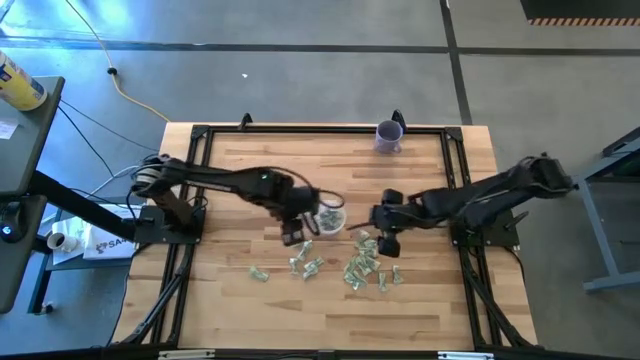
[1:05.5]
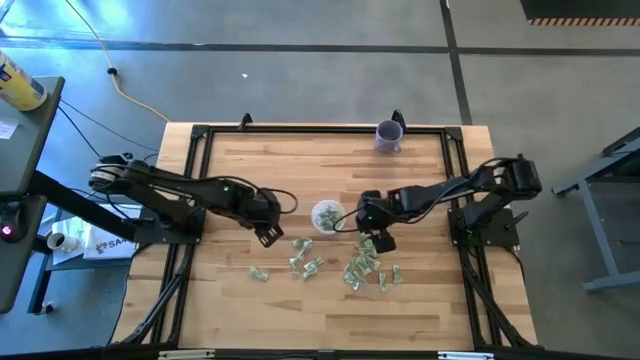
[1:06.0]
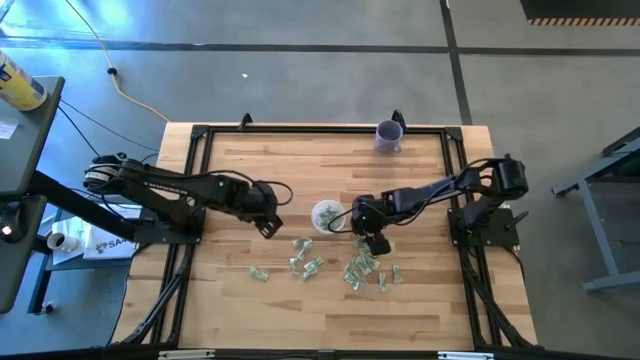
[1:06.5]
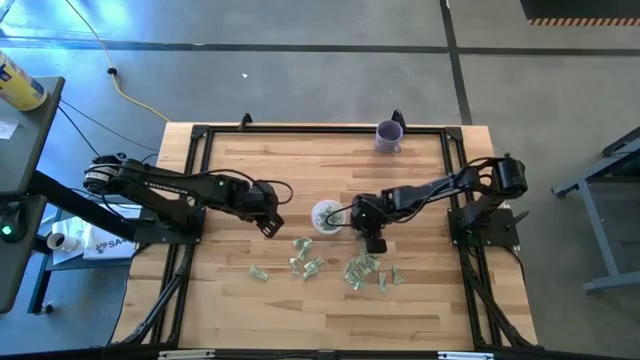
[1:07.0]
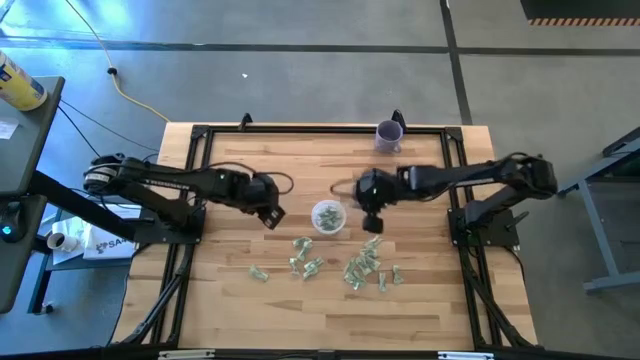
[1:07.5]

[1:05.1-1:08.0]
Task: Pick and place Stevia / Truvia into bins
Put the green stevia packet into the transparent bin

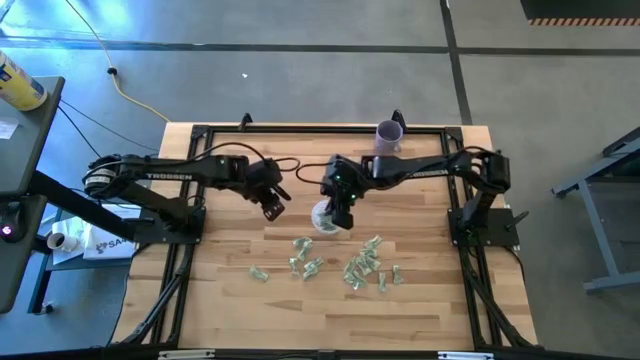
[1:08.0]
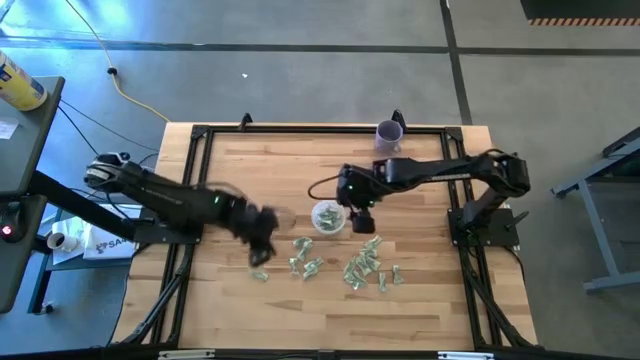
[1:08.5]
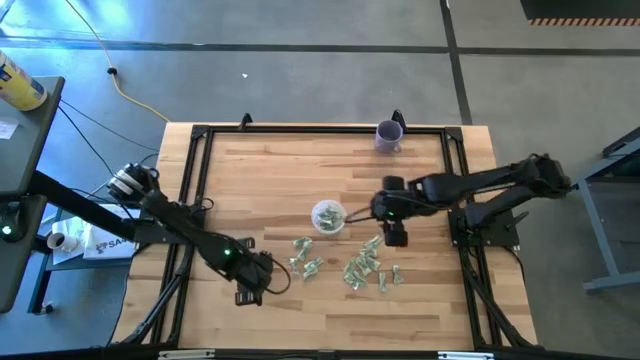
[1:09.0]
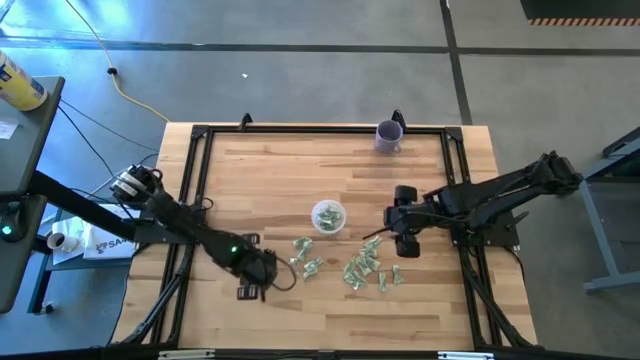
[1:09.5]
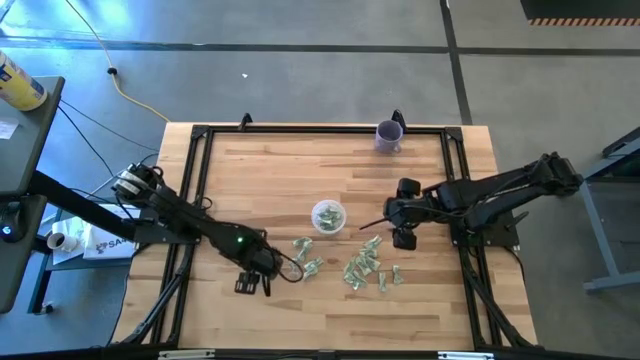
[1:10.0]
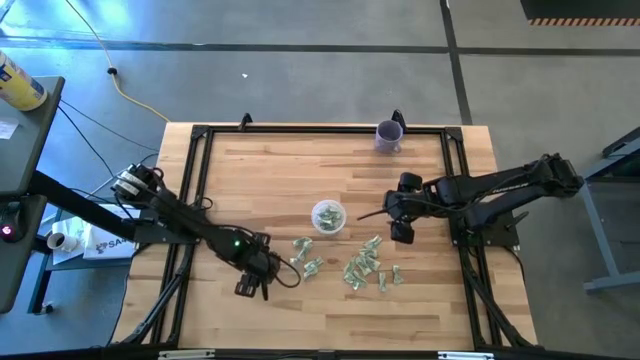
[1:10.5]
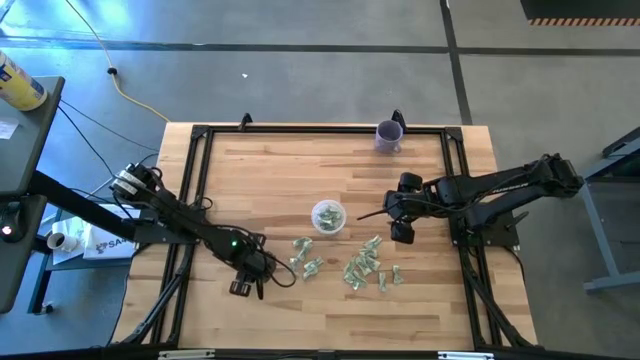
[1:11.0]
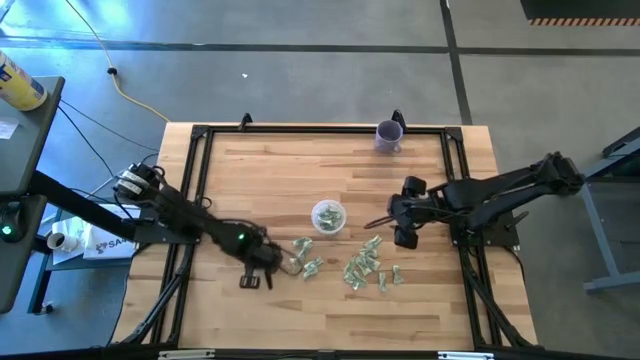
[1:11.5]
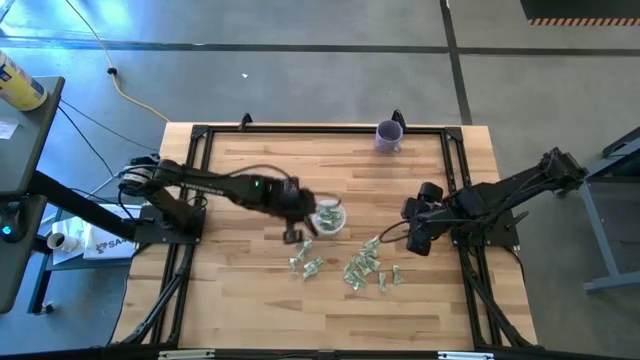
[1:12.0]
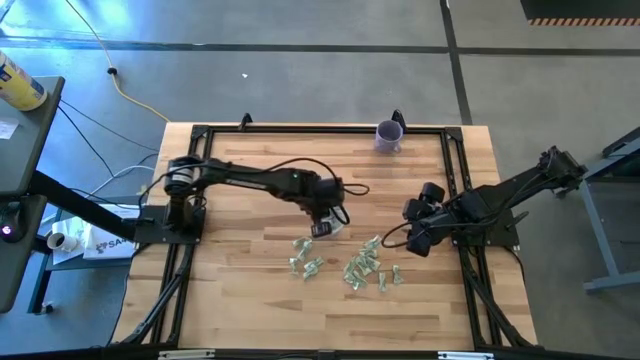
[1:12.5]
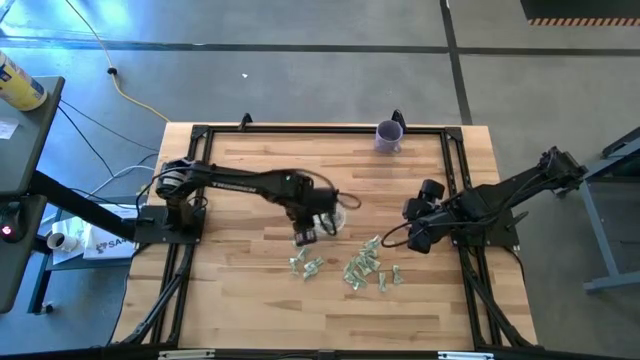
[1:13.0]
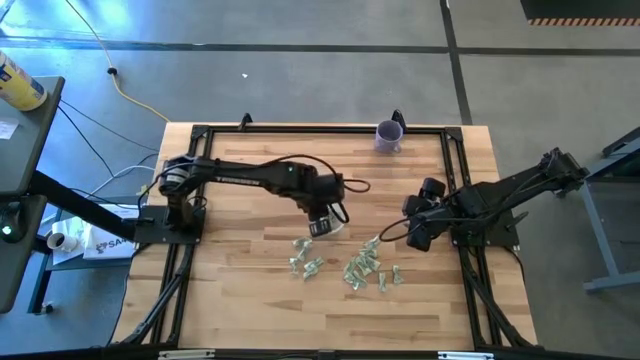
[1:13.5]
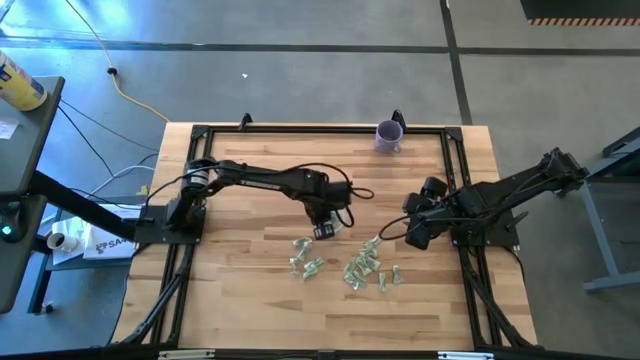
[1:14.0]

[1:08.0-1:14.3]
Put the green stevia packet into the transparent bin

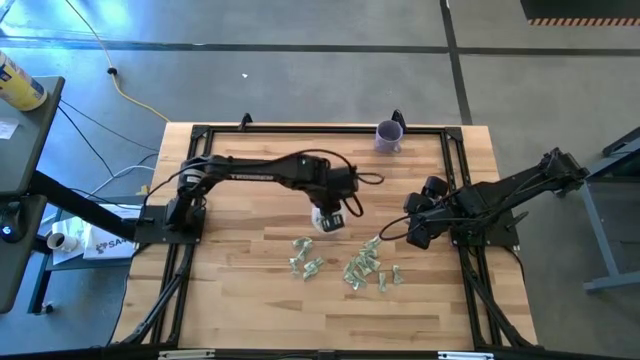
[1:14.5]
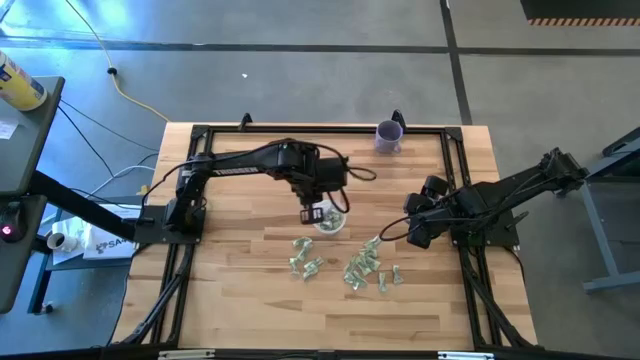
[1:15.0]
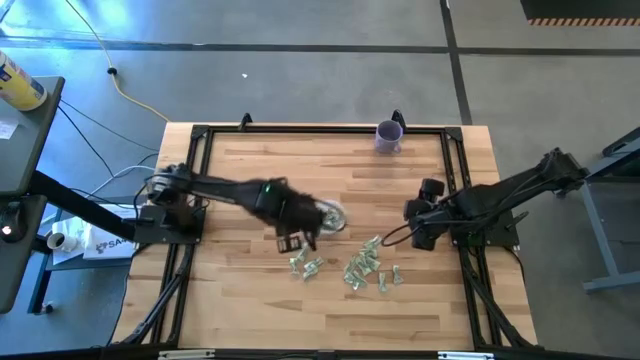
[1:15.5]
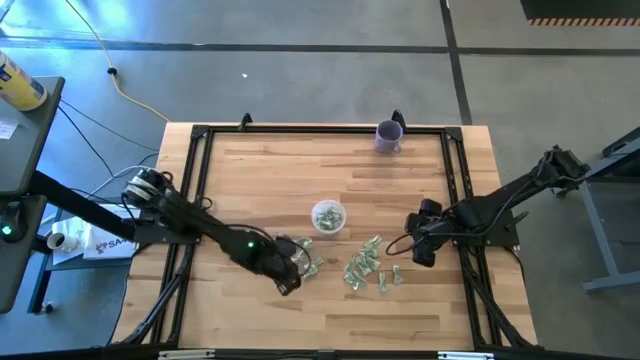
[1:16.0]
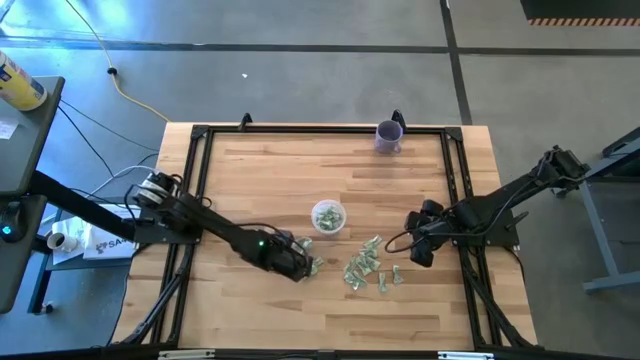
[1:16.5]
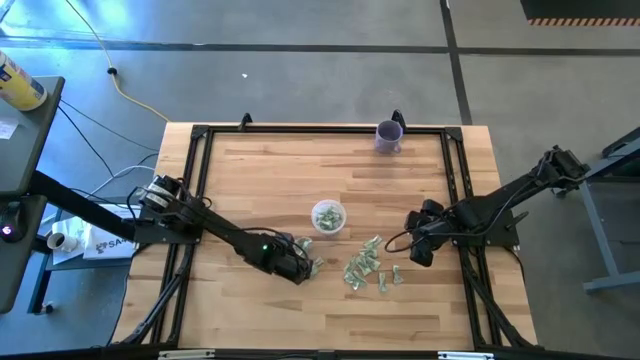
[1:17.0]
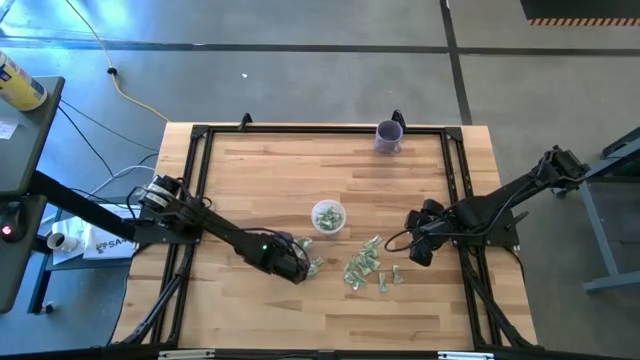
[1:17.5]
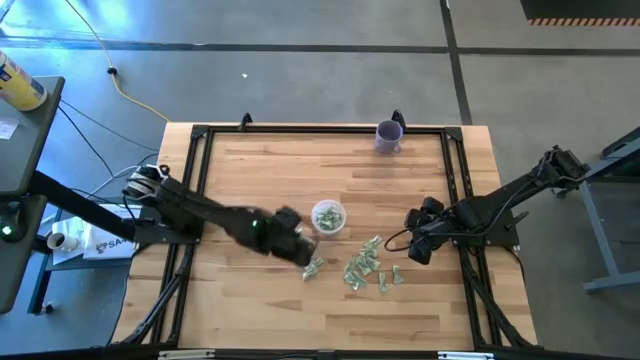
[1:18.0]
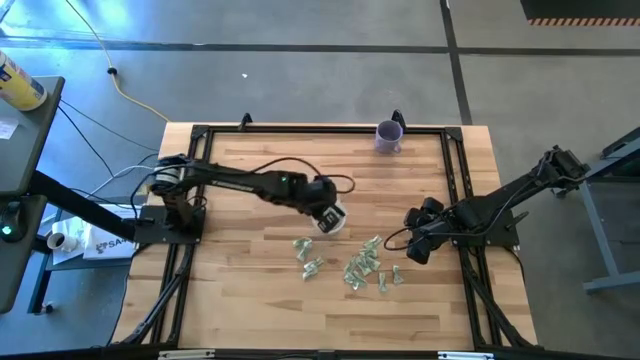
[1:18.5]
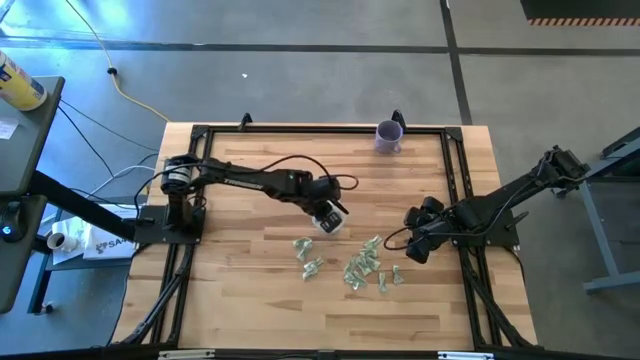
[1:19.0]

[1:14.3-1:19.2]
Put the green stevia packet into the transparent bin

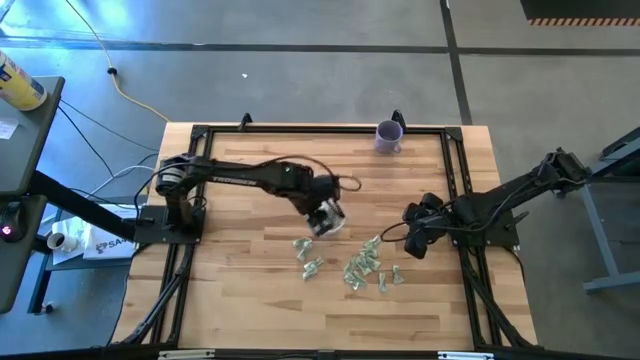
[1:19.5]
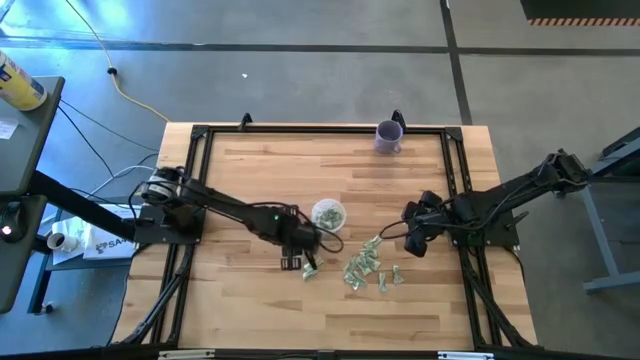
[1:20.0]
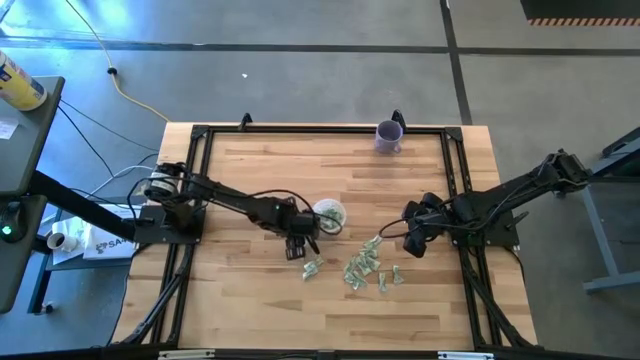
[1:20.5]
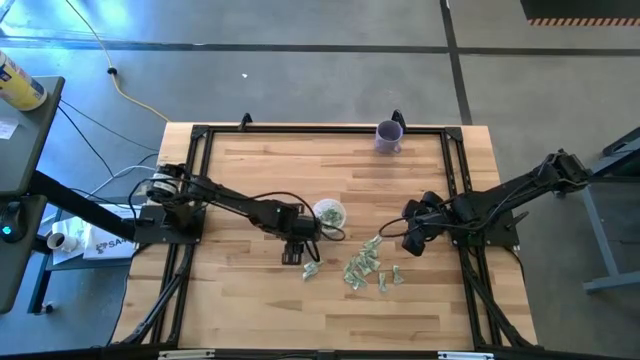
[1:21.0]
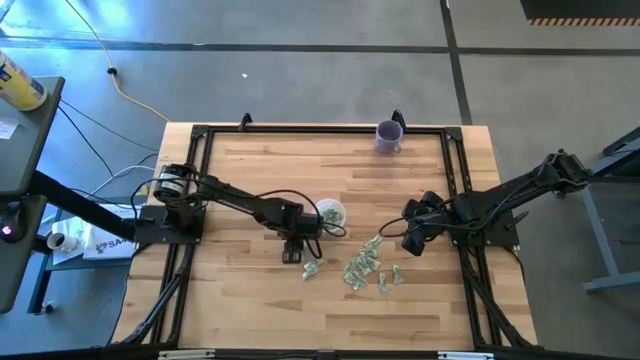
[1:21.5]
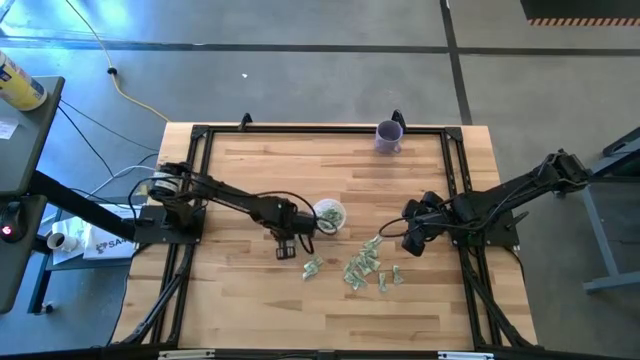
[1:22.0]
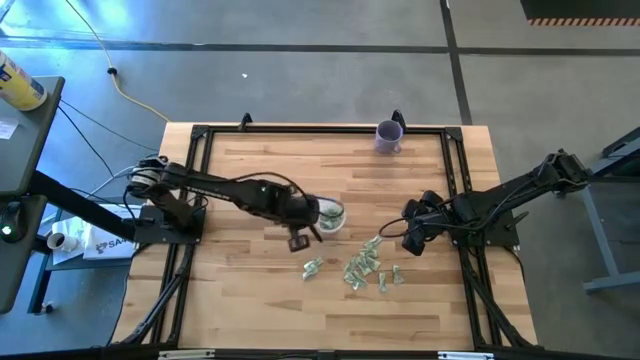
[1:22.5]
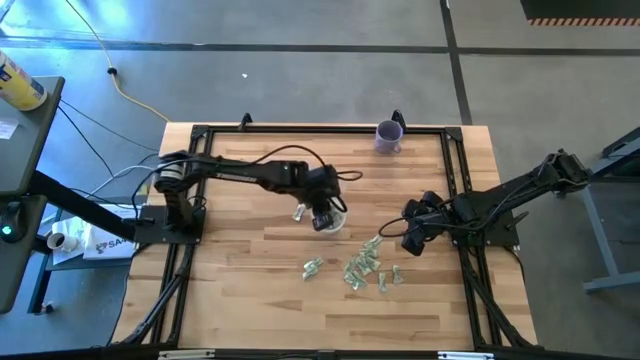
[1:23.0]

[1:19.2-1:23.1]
Put the green stevia packet into the transparent bin

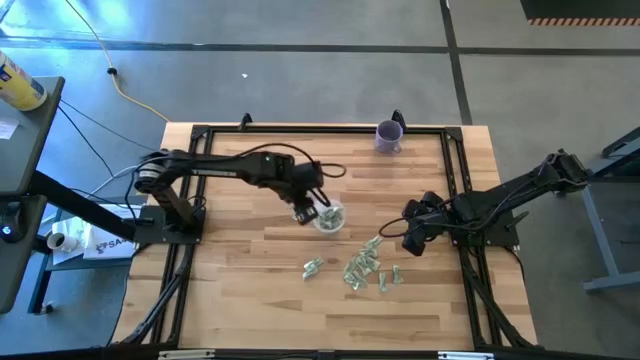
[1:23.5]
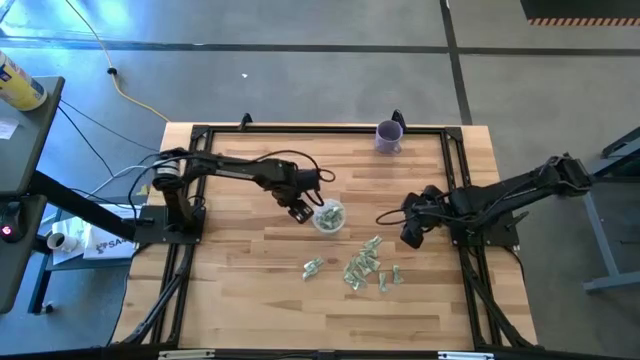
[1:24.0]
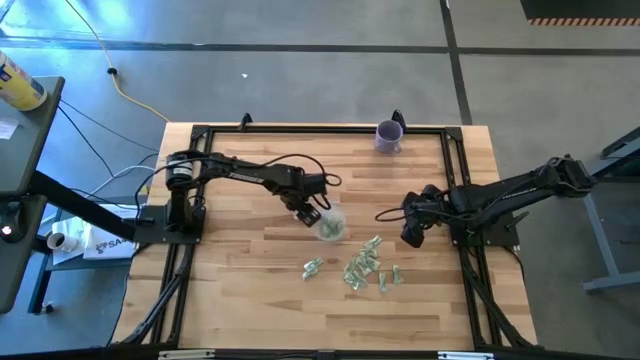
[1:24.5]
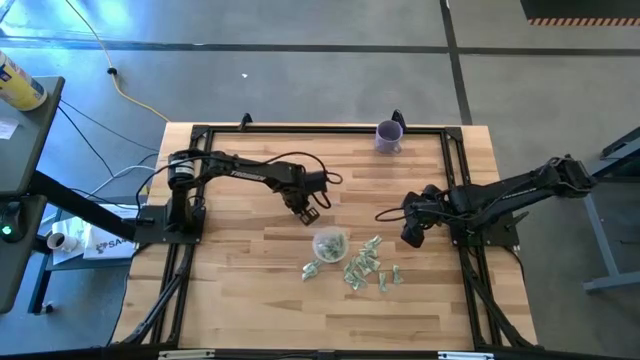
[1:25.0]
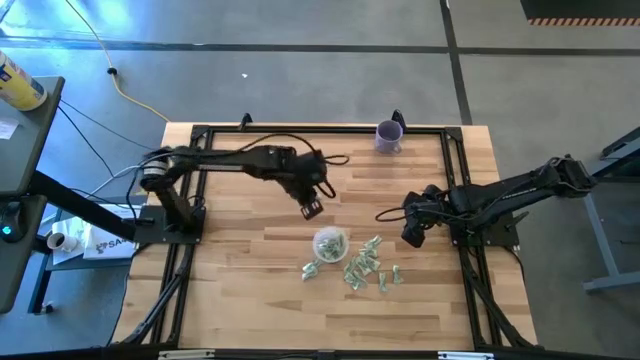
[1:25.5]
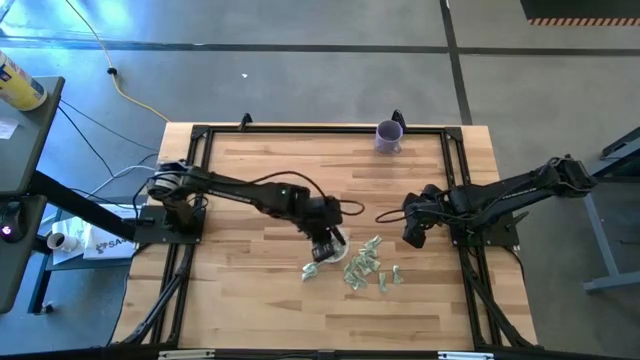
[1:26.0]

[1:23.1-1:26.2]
Put the green stevia packet into the transparent bin

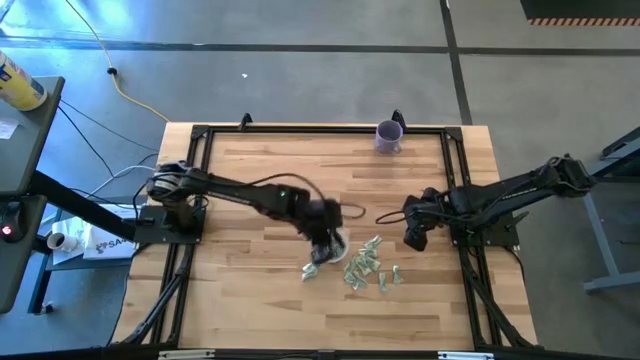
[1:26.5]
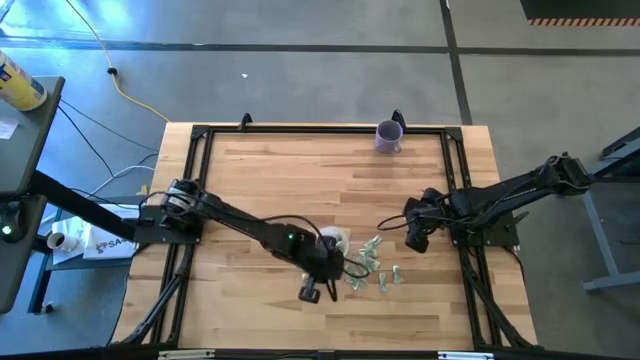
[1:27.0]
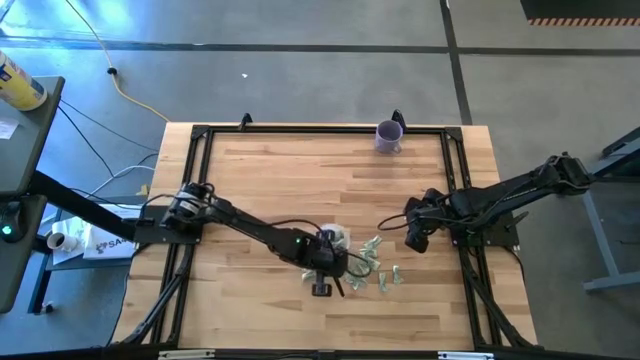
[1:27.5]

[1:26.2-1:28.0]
Adjust the transparent bin
